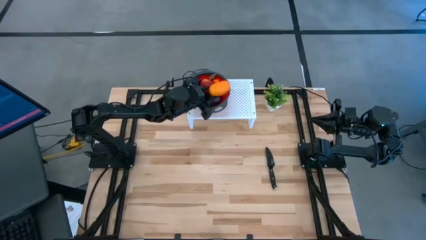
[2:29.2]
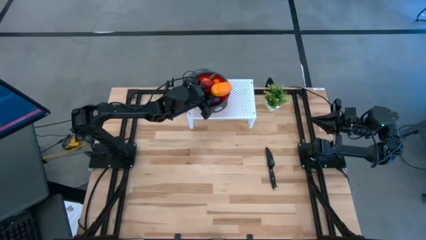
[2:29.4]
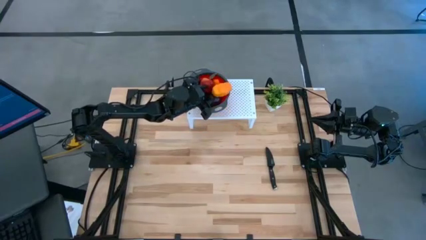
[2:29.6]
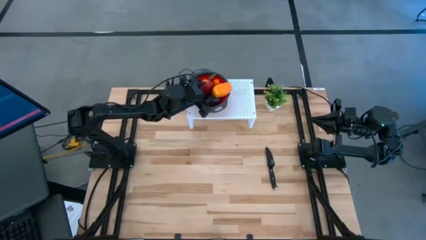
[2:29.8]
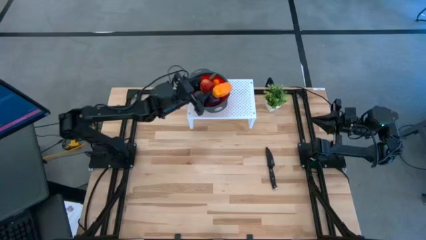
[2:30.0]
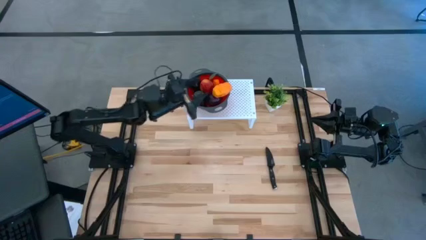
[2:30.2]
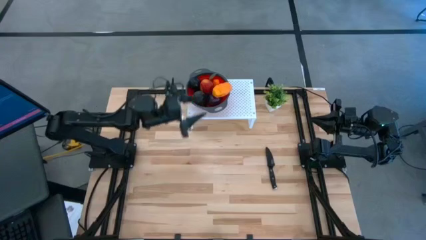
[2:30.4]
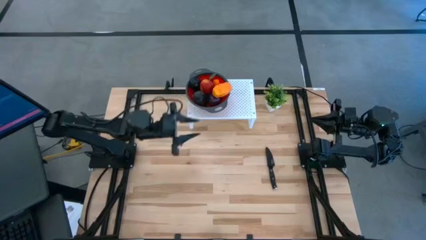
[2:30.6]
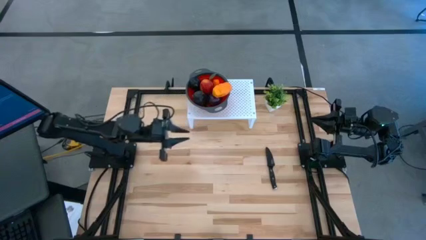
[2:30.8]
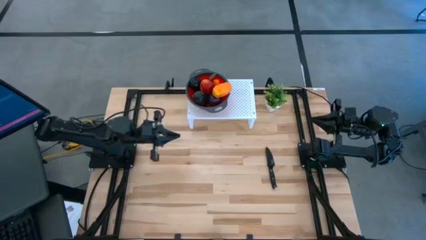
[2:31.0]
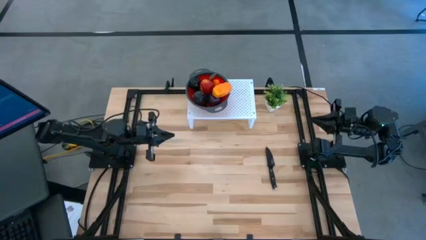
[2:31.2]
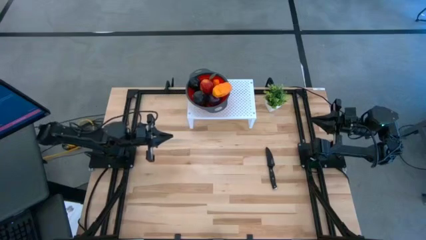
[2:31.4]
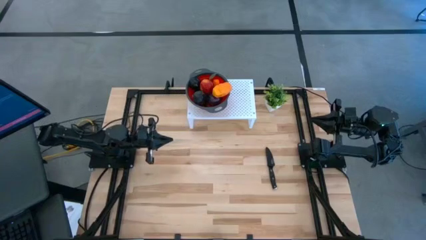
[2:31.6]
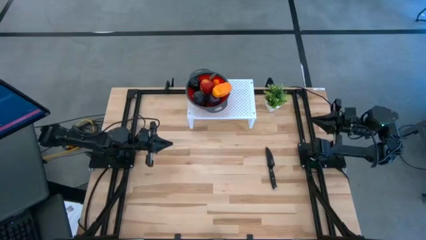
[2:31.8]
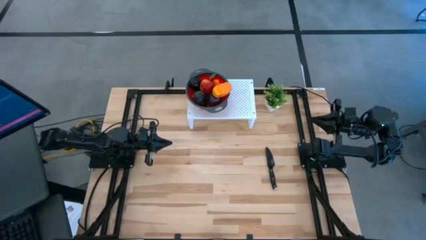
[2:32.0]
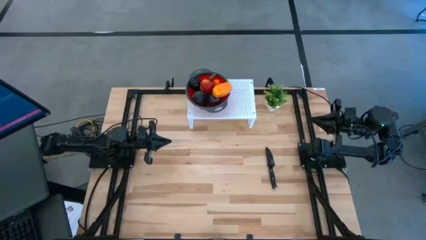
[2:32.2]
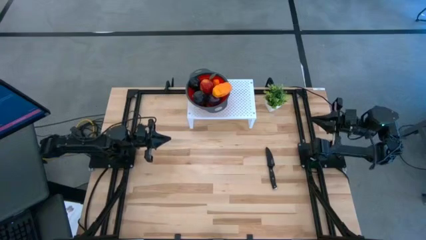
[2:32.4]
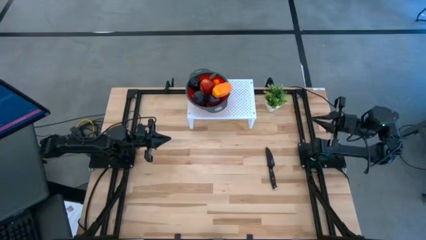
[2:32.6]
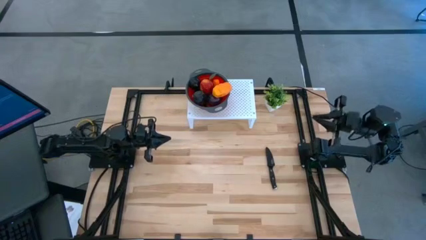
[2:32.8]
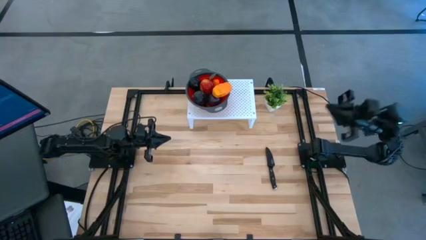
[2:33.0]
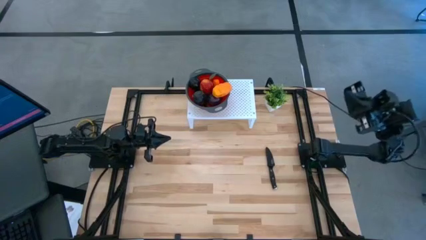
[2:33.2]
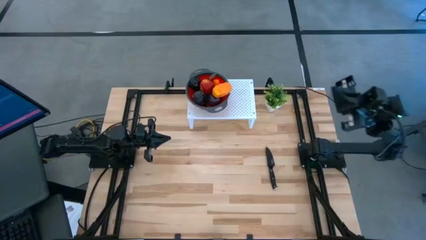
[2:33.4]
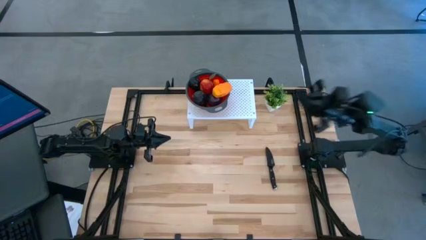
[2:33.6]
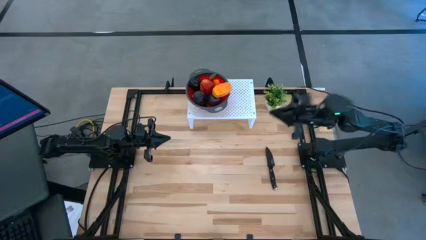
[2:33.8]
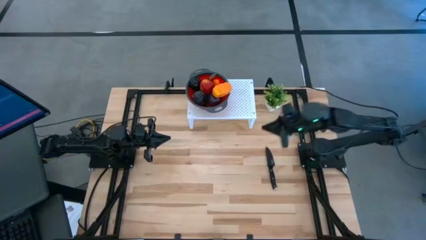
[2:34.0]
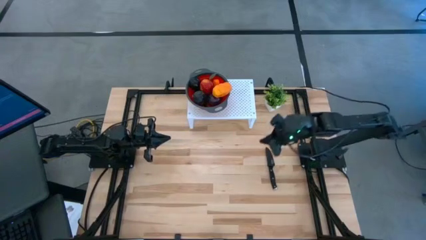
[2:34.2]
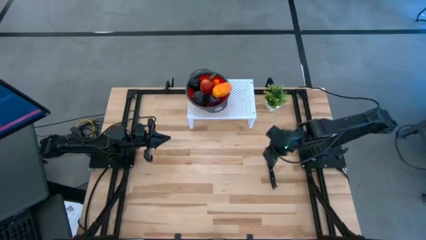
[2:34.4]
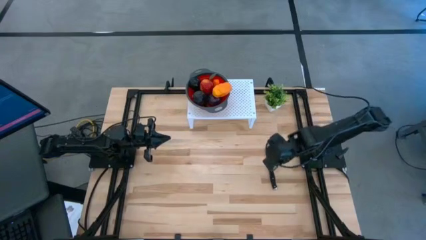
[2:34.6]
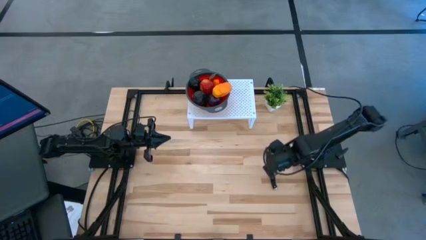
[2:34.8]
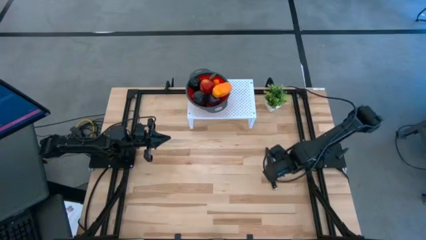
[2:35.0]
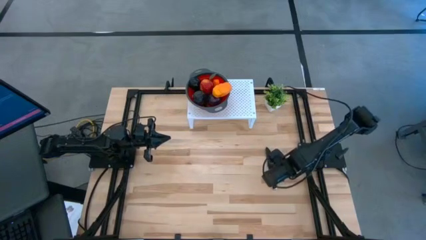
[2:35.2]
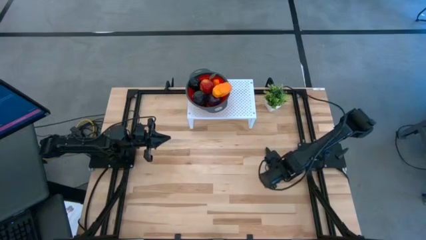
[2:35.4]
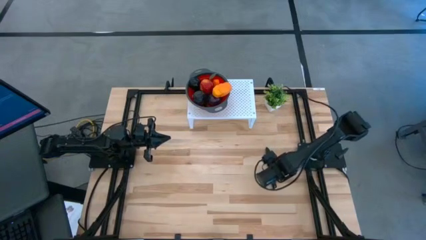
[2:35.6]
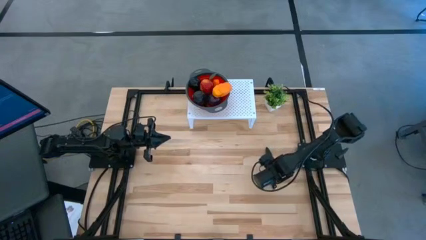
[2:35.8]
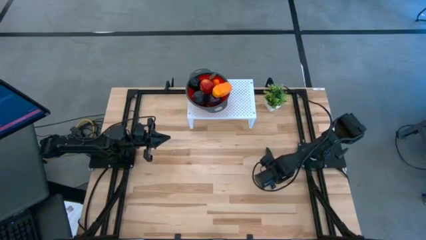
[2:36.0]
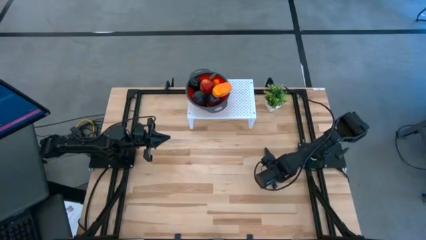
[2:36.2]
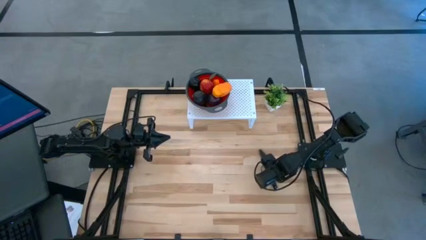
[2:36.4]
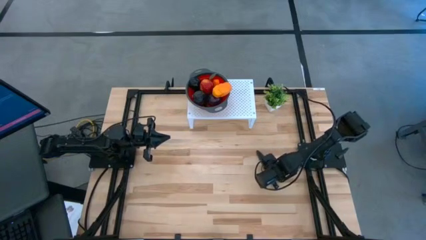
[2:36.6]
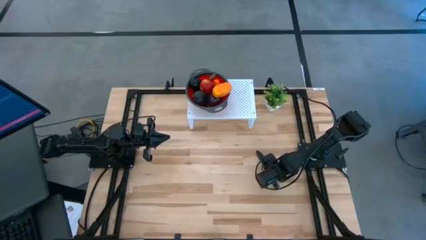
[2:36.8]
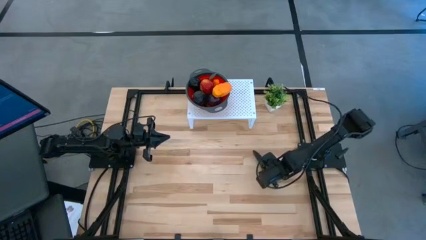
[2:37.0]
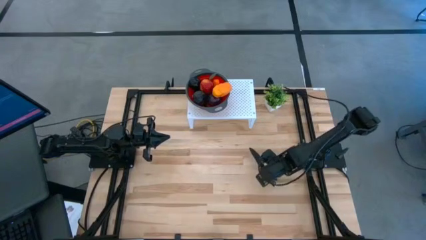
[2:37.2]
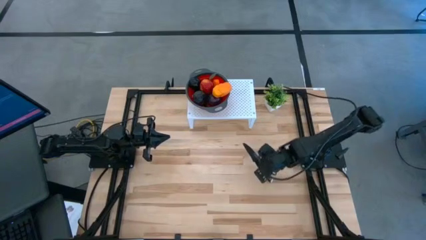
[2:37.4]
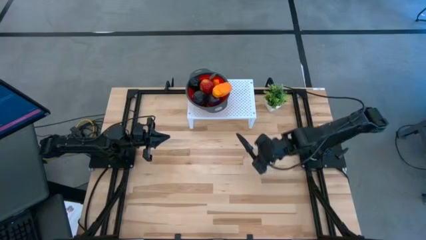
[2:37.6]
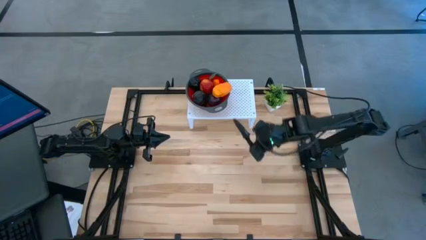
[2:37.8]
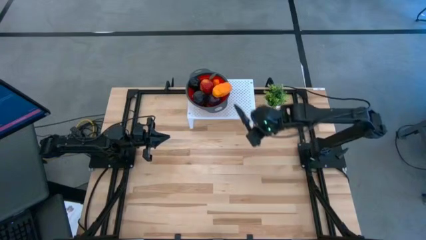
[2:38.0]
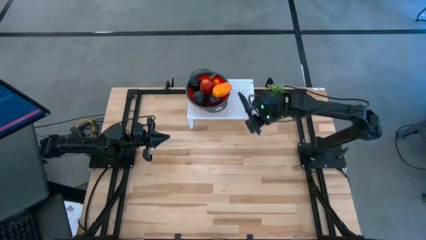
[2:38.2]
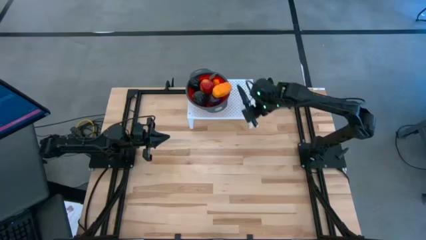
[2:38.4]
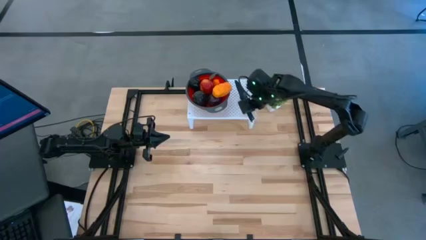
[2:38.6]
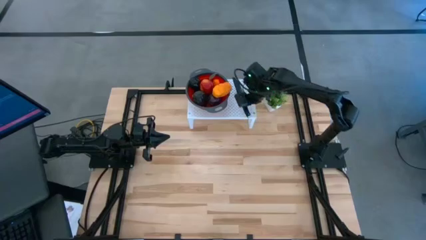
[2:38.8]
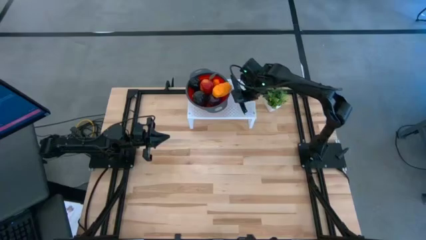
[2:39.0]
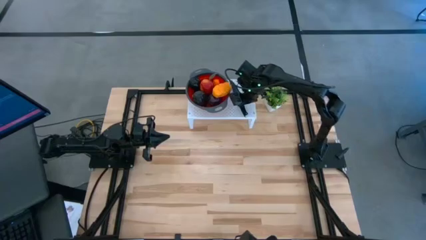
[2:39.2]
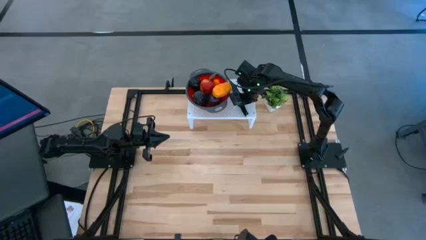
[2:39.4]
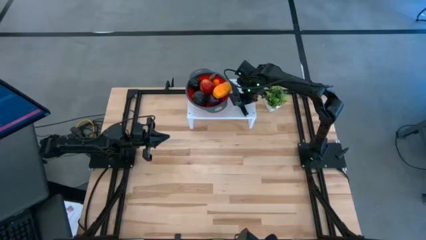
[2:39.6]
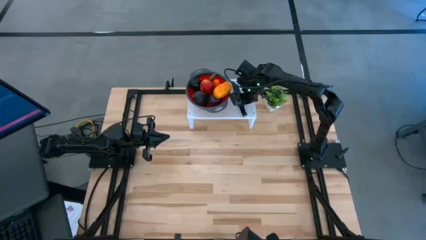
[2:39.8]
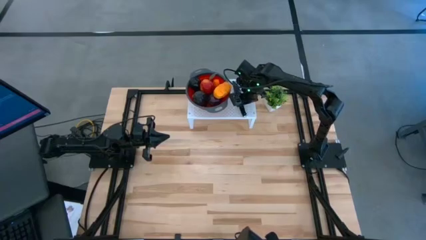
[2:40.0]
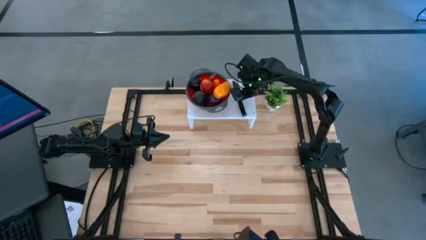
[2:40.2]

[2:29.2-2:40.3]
Task: Pick & Place Fruit
Put the knife on the right side of the shelf

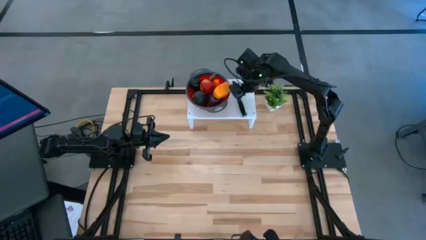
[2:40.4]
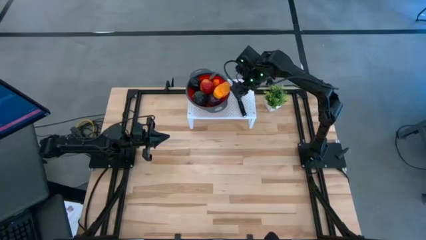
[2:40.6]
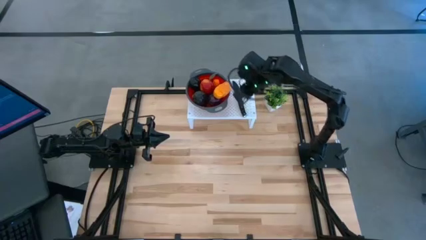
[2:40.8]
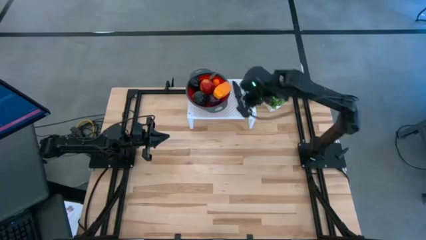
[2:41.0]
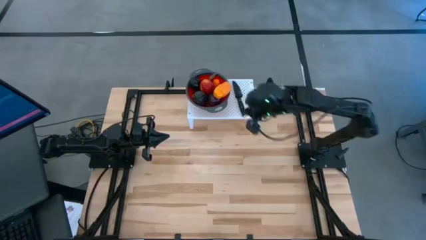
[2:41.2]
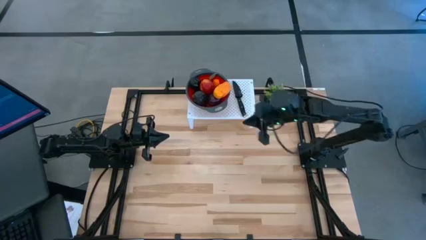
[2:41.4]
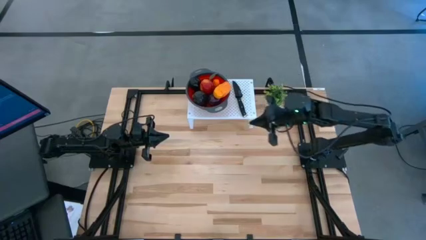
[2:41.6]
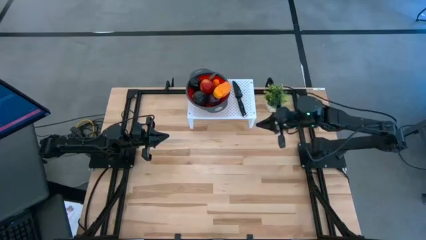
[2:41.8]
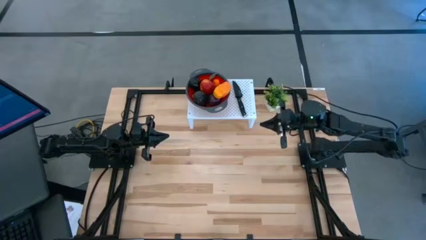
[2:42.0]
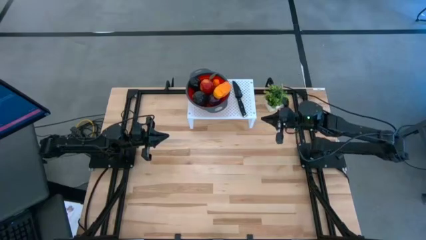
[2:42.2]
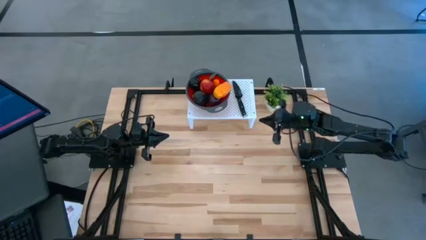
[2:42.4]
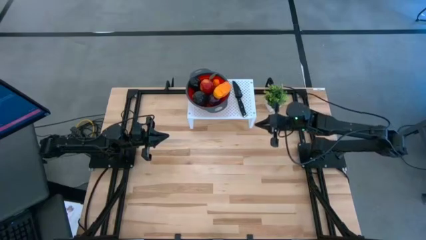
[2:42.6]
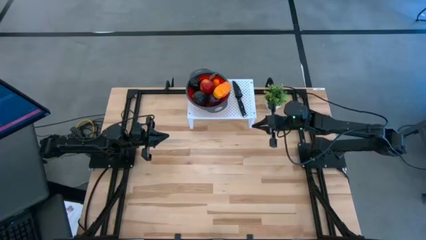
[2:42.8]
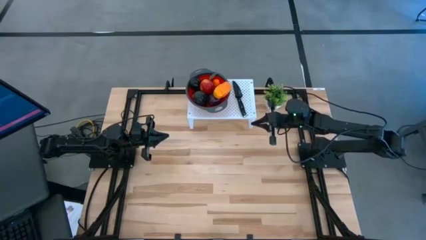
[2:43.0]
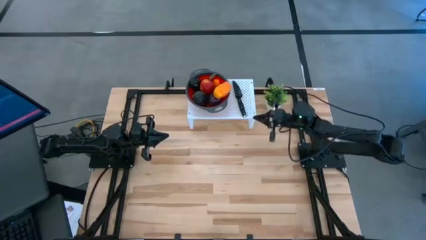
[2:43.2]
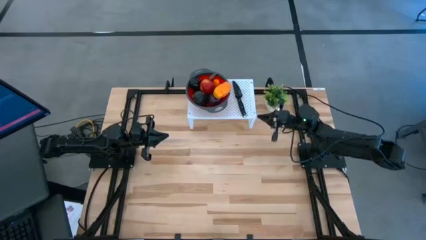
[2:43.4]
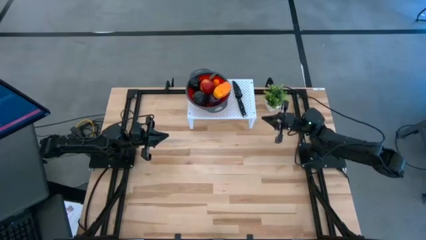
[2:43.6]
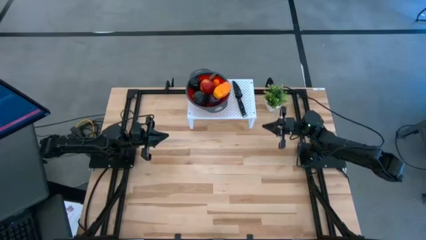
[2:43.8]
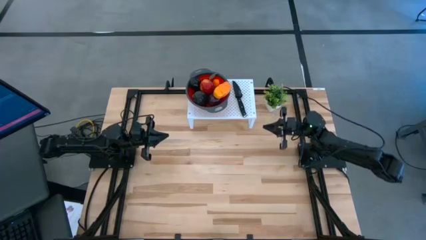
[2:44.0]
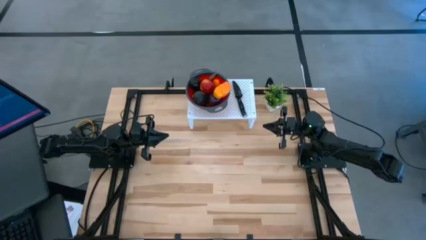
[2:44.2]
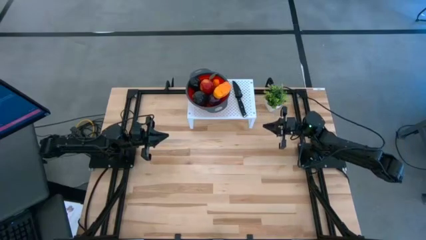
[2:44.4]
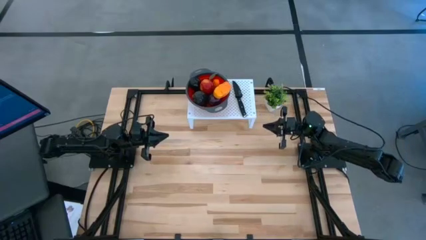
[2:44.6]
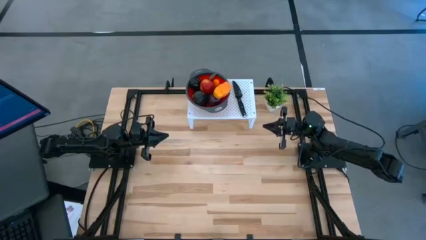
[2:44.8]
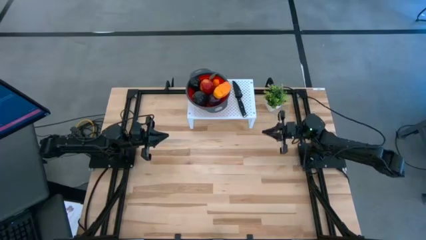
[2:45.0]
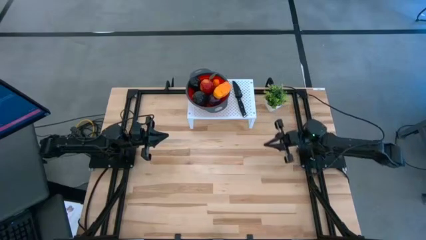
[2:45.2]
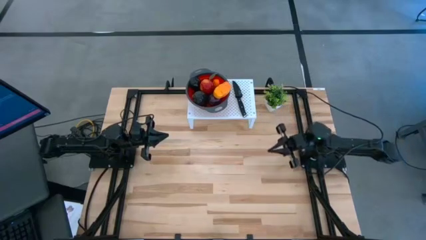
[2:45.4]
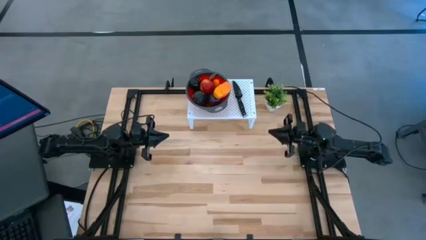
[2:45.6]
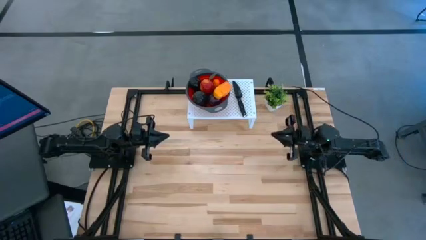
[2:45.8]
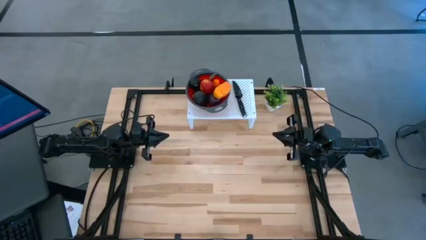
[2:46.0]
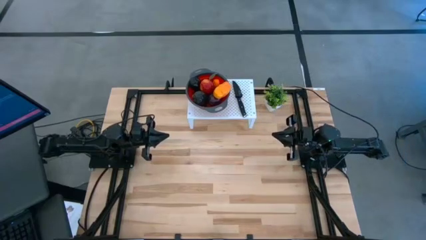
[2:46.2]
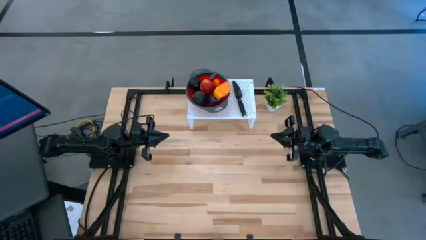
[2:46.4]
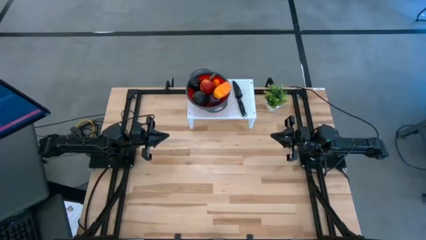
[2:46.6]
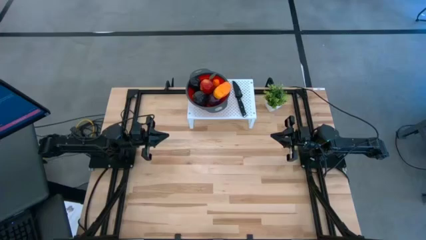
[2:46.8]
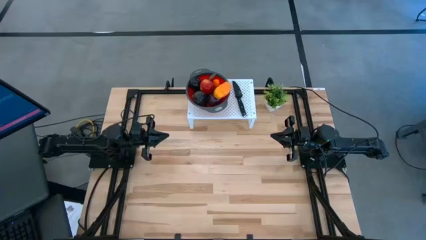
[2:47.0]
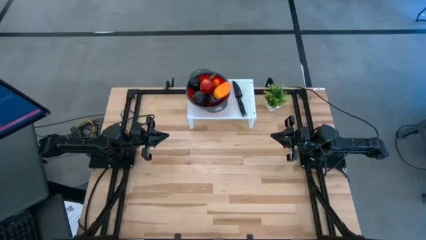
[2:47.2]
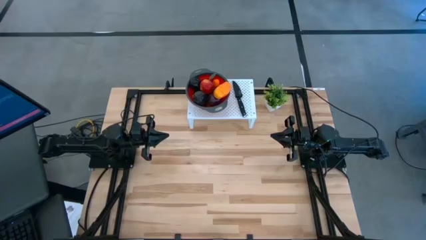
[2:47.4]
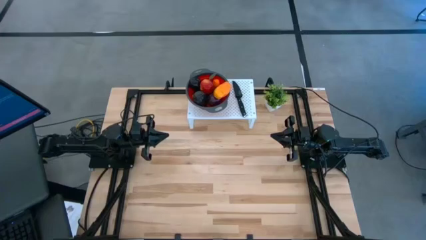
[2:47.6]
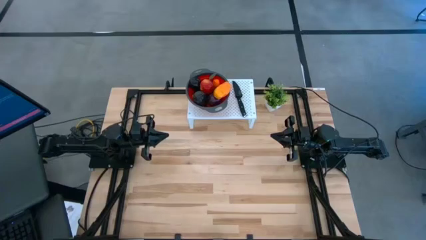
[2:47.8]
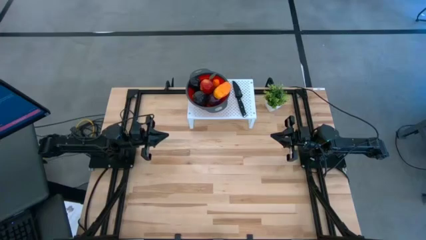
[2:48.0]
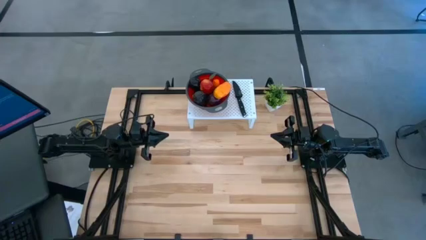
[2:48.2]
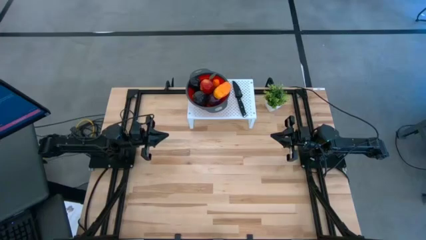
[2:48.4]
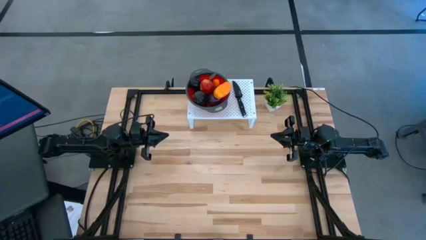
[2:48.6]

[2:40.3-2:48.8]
Return to Home Position
